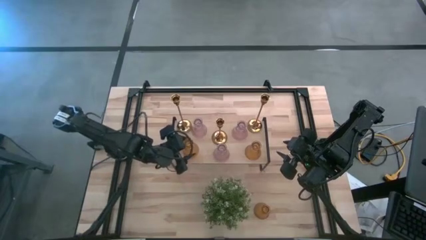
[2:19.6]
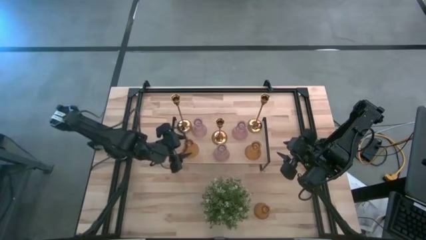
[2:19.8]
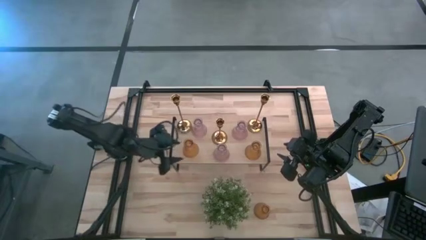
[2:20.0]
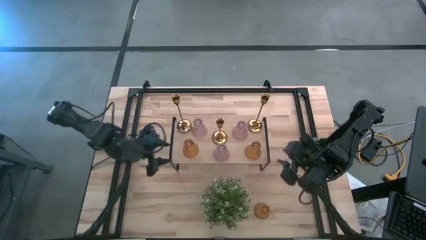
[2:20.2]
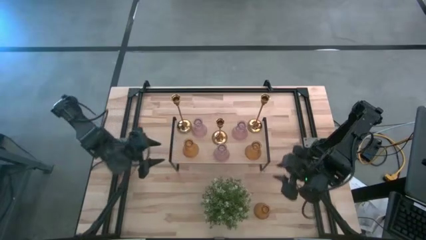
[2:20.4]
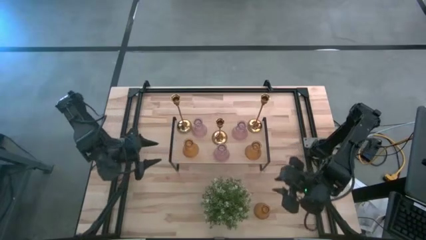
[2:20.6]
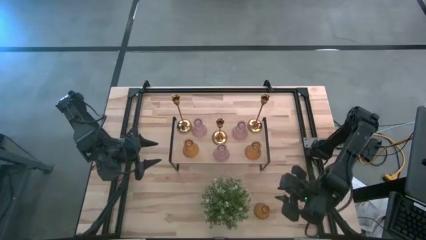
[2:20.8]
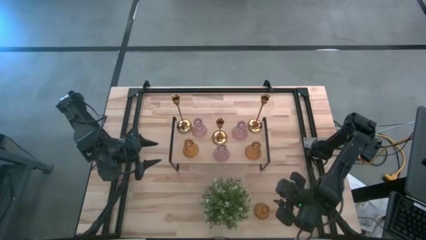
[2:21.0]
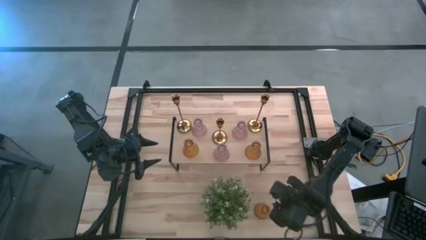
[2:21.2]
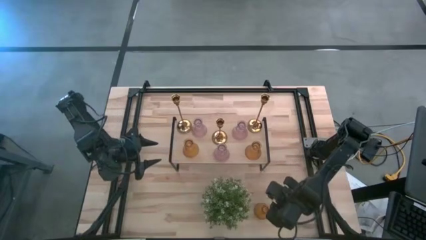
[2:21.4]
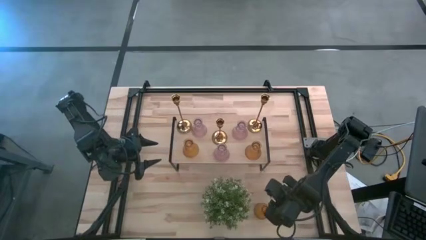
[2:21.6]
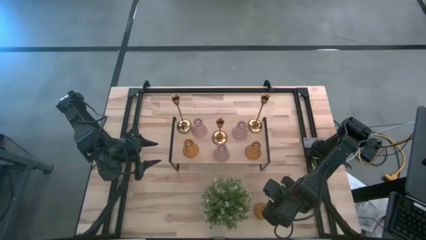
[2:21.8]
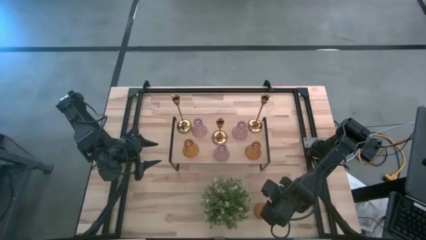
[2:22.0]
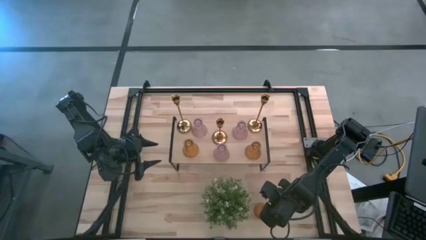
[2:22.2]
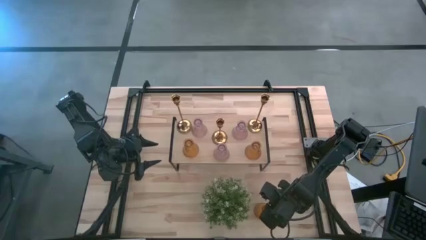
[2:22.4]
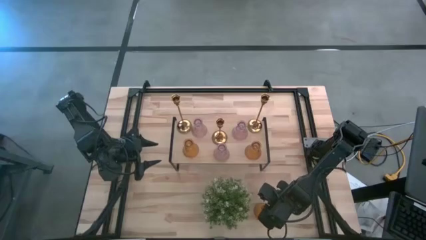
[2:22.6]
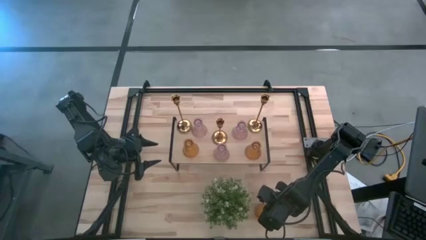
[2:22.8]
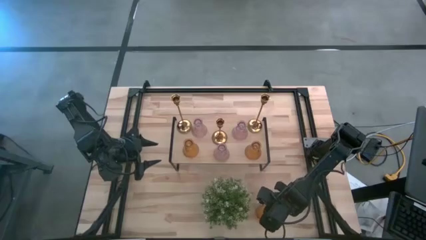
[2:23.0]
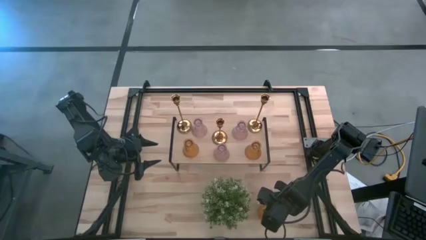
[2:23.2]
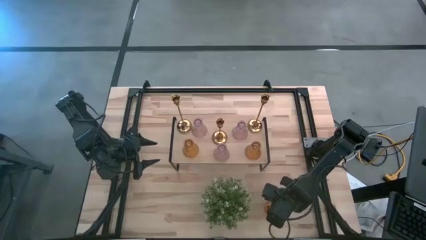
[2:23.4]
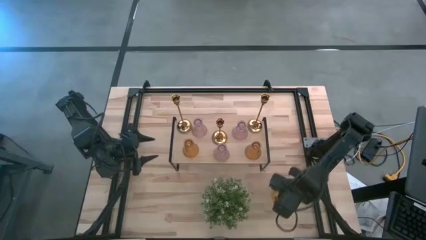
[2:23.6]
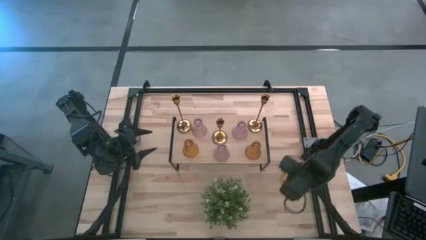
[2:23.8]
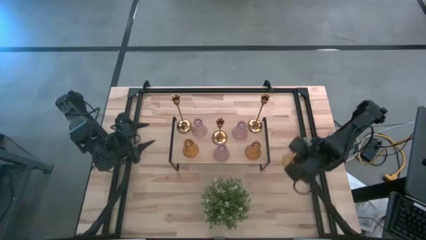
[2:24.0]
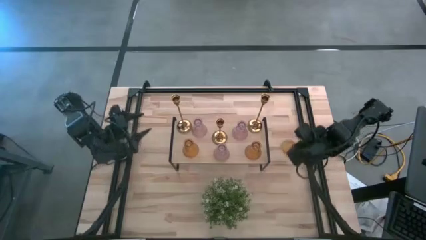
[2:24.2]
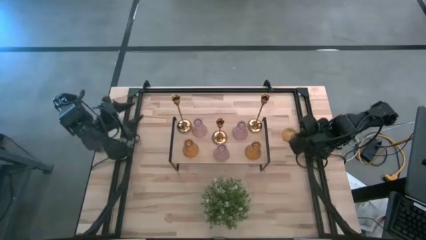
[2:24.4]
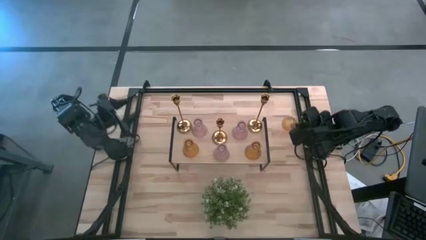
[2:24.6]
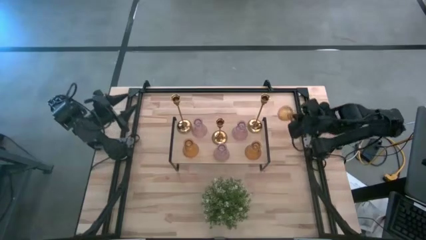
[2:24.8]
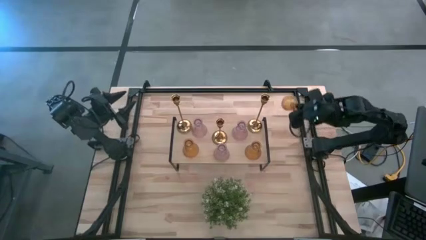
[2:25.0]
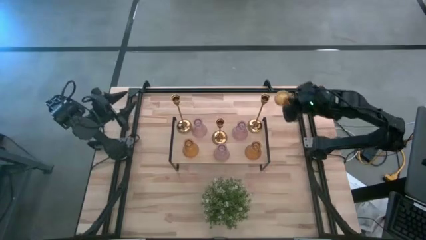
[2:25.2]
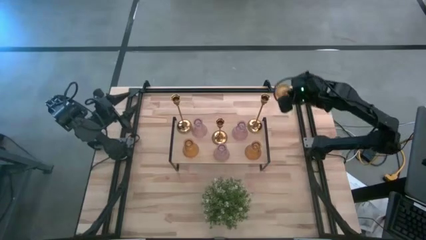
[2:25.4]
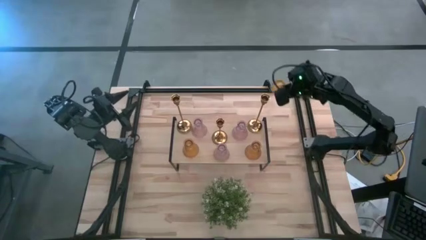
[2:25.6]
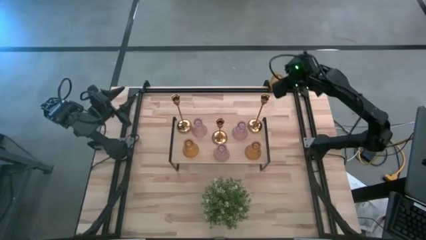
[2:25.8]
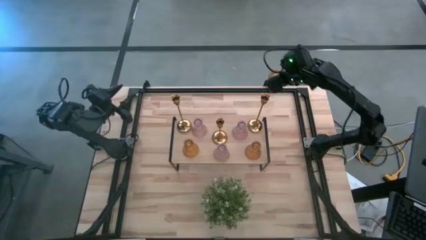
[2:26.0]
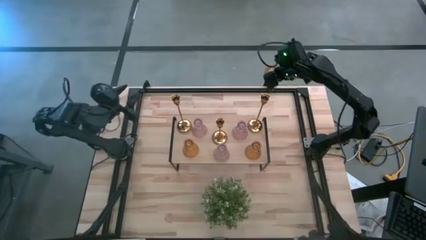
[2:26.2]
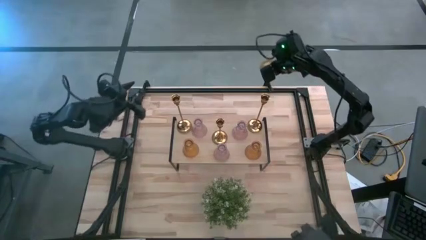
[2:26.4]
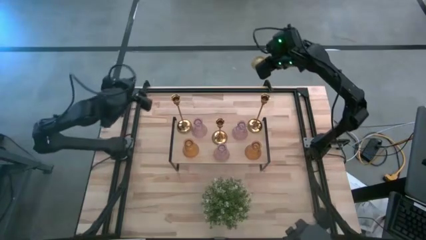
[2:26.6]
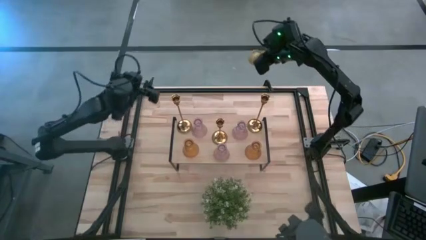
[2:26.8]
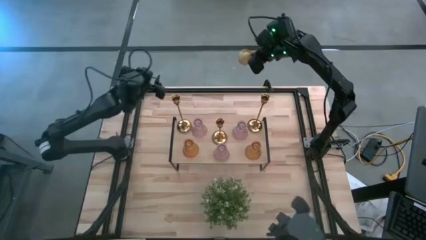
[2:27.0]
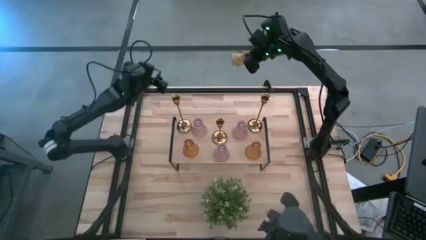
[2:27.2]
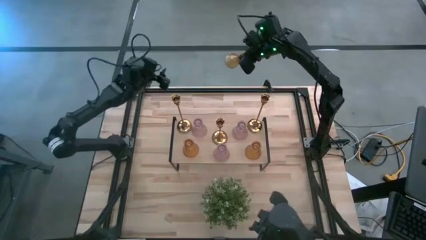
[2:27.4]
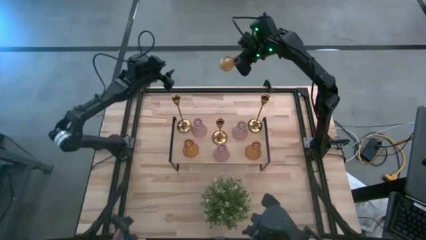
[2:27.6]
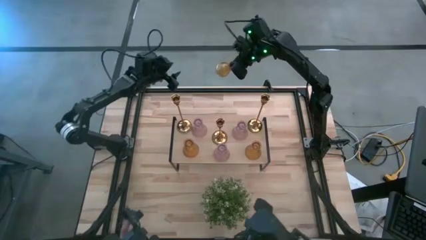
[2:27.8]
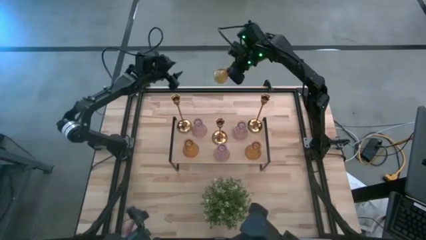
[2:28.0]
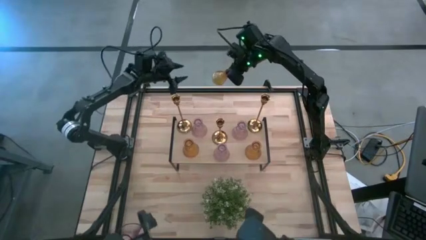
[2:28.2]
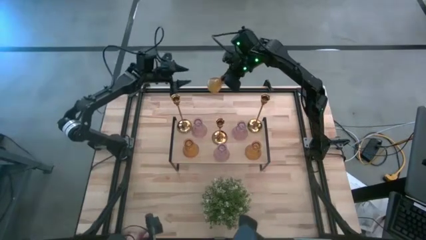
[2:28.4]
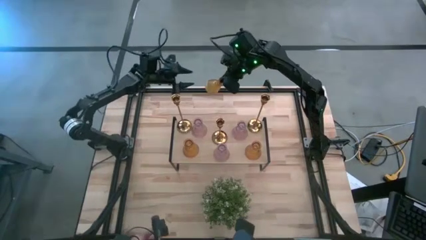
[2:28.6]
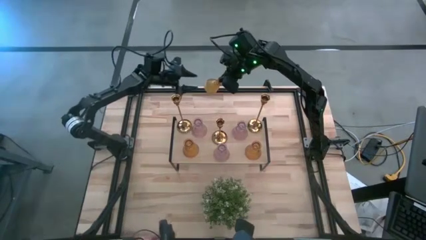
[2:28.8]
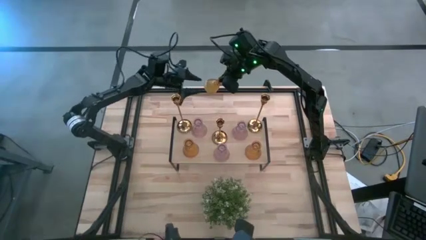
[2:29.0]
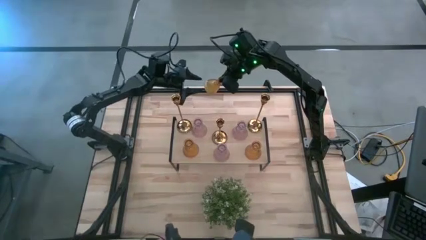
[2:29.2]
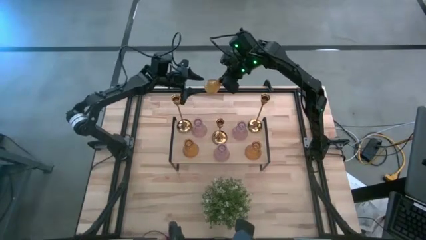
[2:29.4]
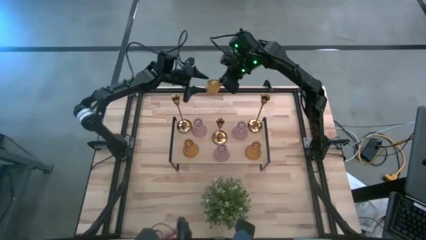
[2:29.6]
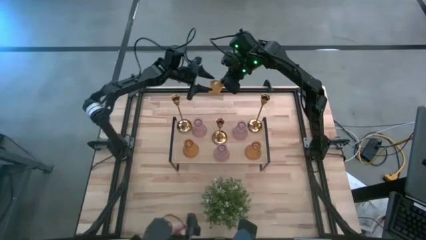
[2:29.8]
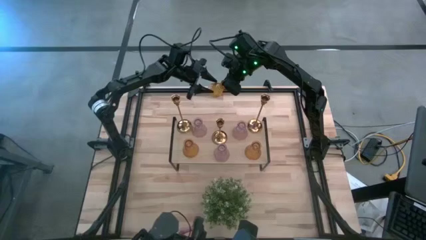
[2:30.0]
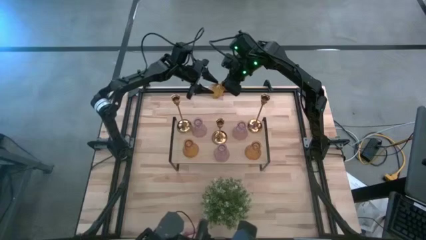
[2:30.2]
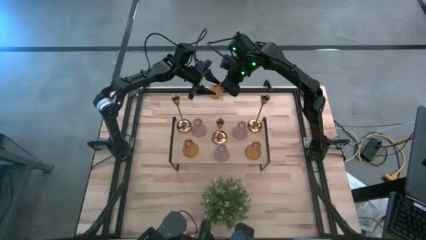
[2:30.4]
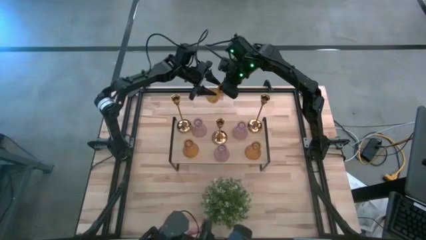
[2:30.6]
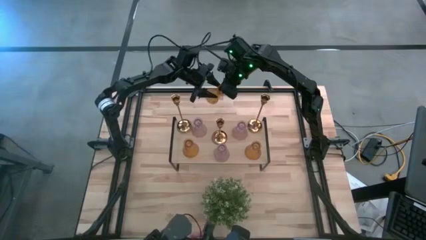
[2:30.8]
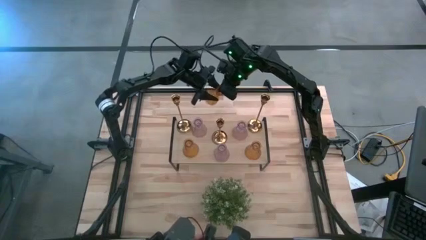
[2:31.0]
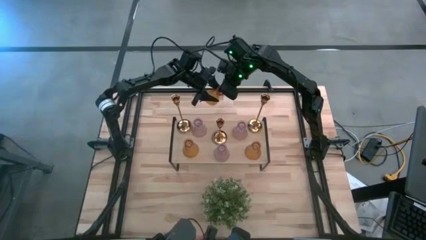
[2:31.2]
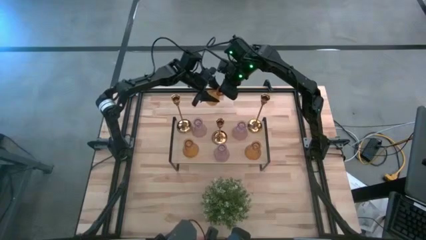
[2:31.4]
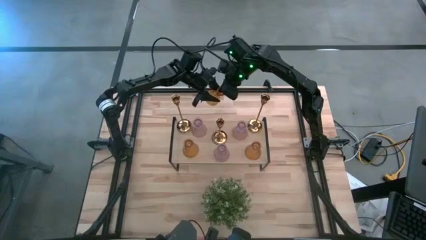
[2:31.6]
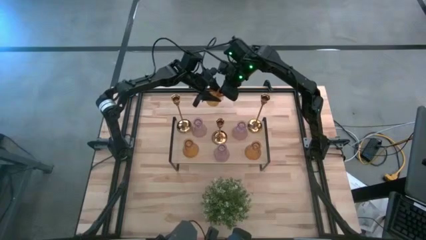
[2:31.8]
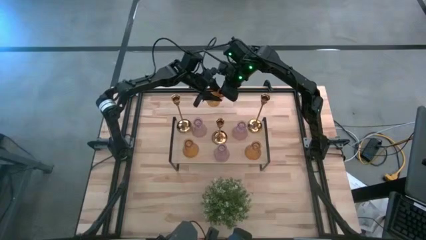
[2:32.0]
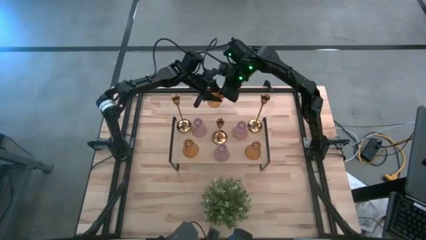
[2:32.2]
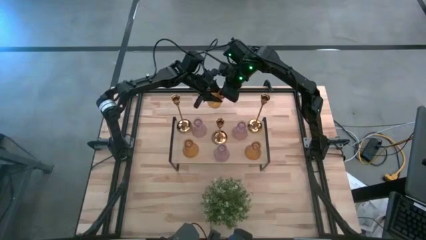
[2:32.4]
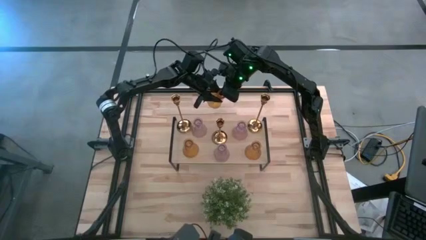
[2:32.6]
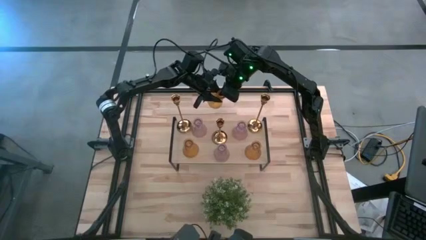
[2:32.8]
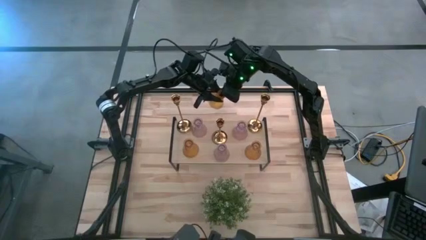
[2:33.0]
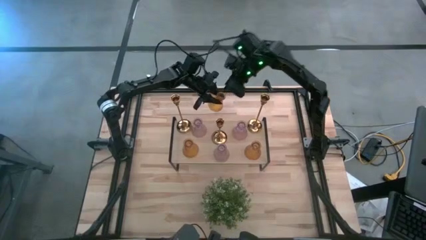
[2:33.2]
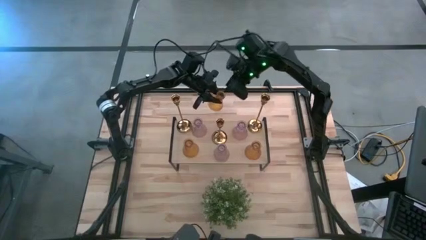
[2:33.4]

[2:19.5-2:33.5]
Task: Pick & Place candle stick holders
Put the yellow vase on the shelf

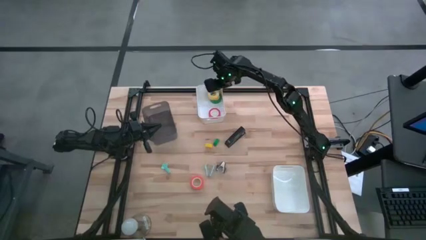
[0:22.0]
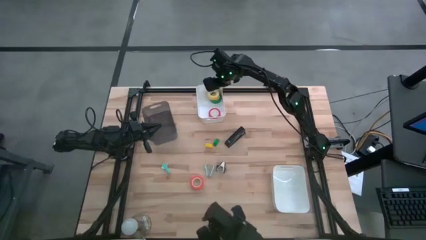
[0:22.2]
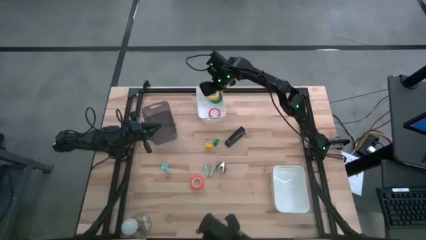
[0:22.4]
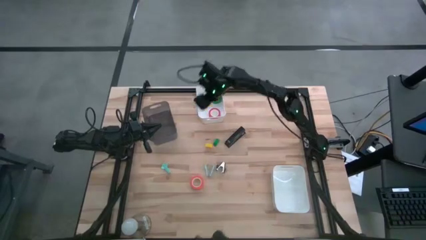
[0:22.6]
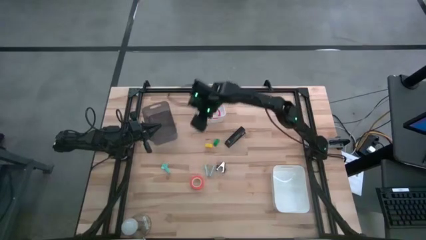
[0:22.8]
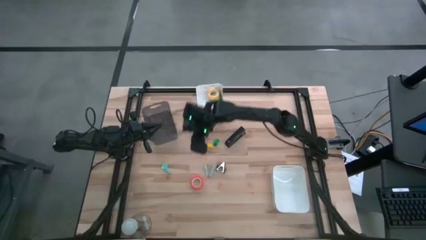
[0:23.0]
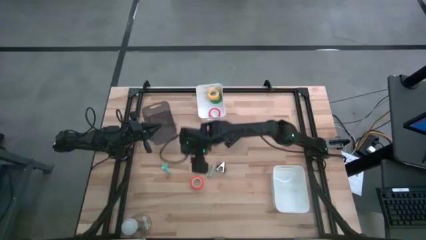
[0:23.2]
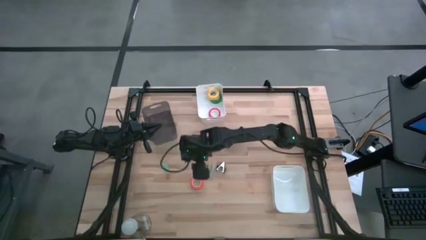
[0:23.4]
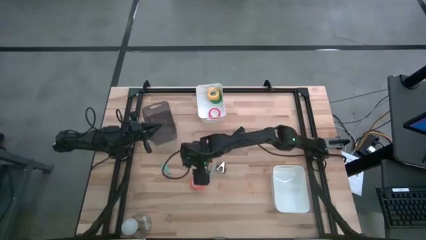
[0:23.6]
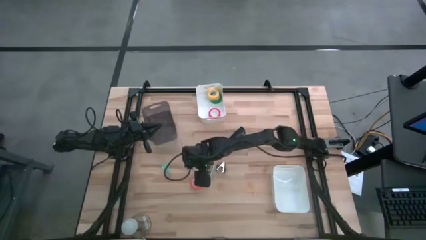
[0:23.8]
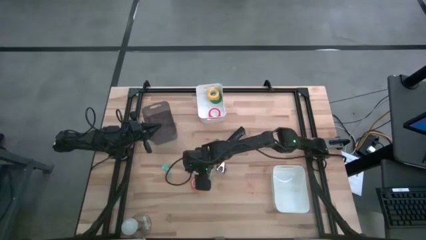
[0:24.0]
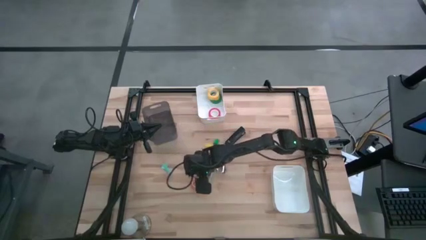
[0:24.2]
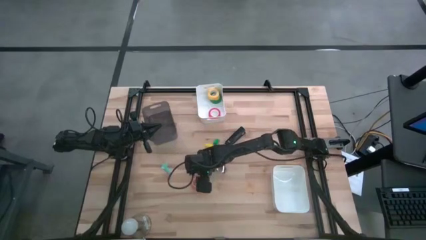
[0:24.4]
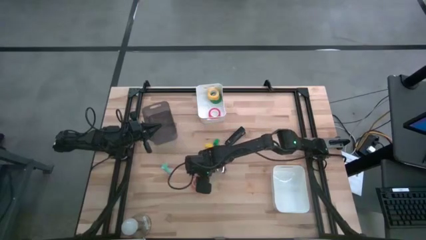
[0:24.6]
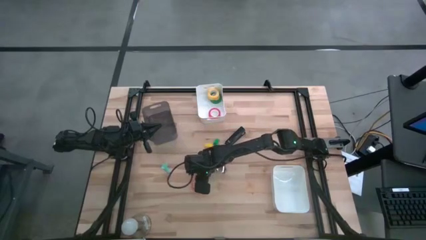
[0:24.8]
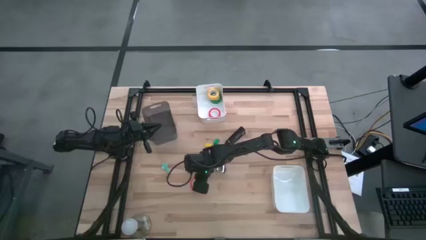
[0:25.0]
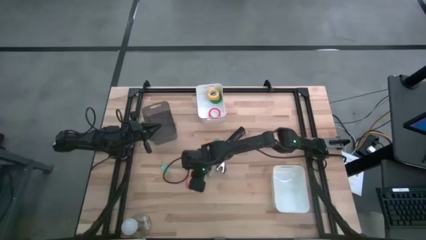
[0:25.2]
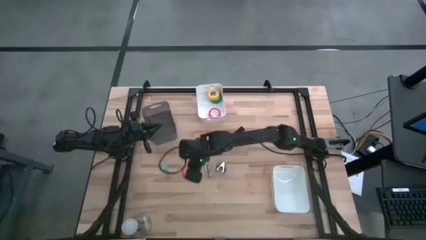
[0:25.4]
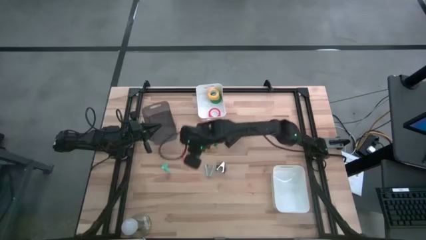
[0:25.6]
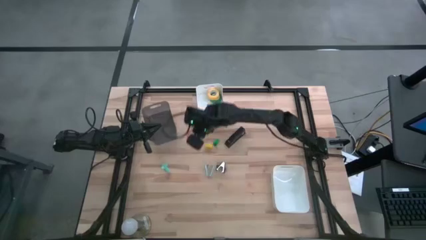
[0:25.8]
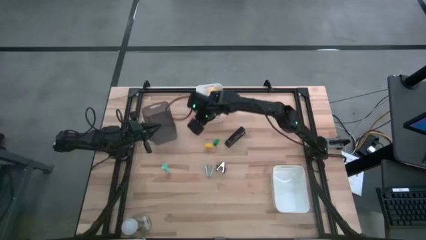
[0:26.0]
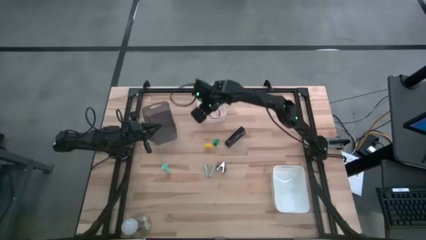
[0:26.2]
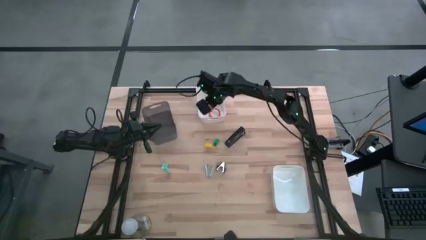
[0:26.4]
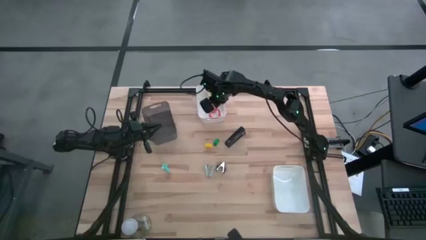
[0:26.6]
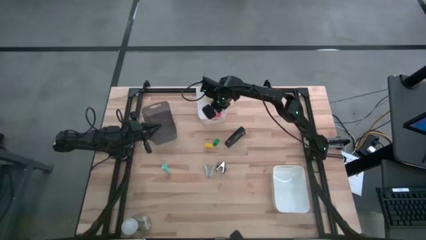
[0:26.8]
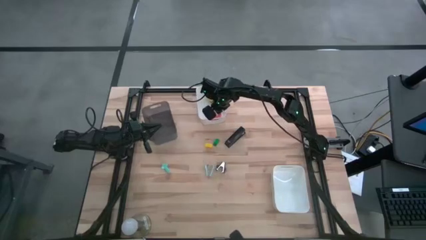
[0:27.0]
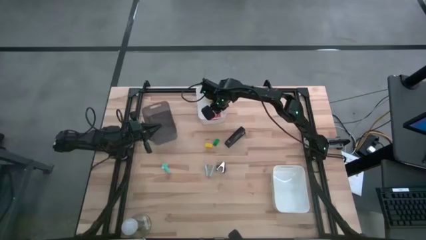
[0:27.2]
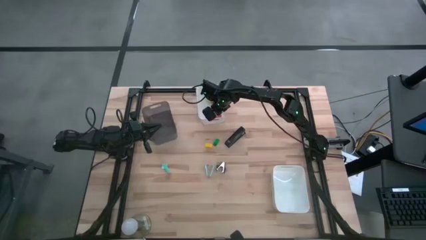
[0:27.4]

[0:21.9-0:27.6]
Task: Pick and place Stapler, Stapler remover, tape
Put the orange tape into the top white bin
